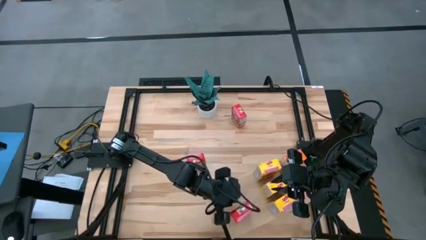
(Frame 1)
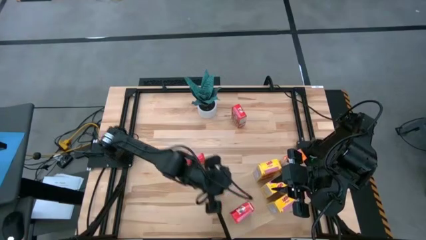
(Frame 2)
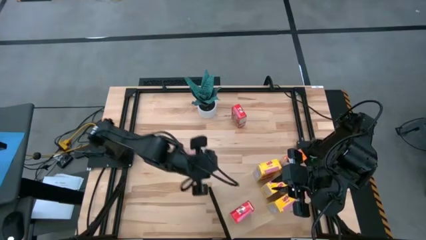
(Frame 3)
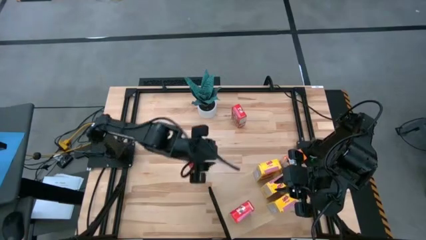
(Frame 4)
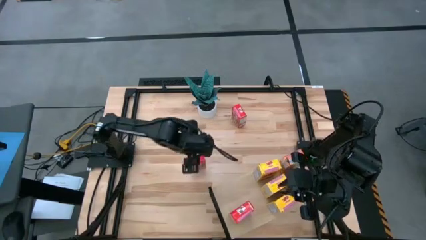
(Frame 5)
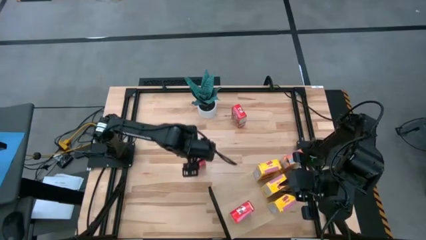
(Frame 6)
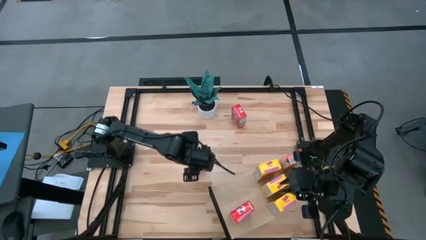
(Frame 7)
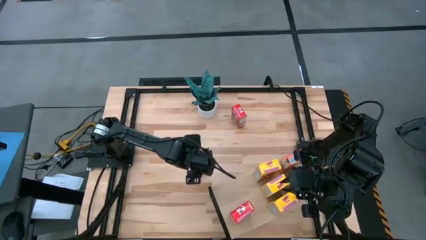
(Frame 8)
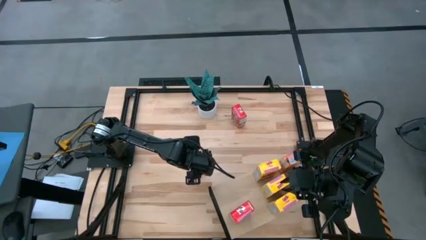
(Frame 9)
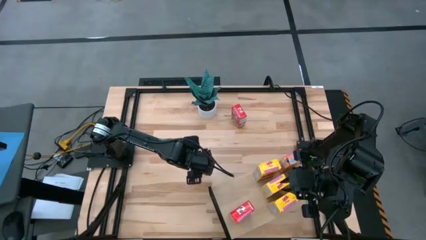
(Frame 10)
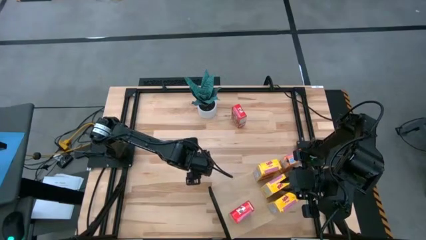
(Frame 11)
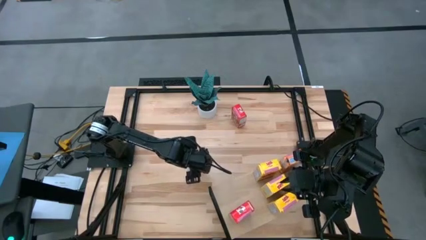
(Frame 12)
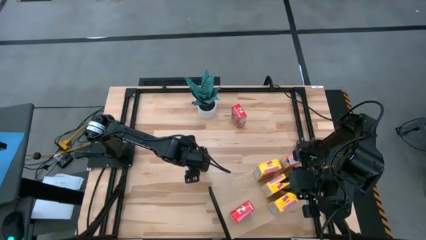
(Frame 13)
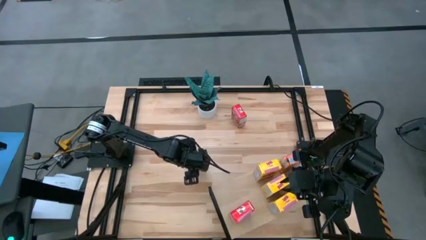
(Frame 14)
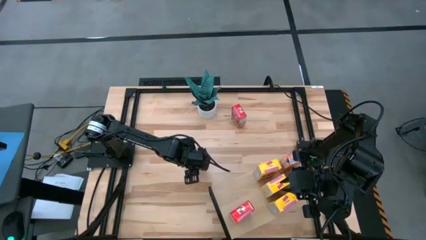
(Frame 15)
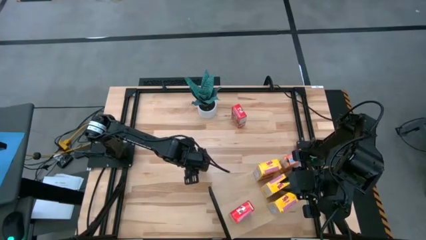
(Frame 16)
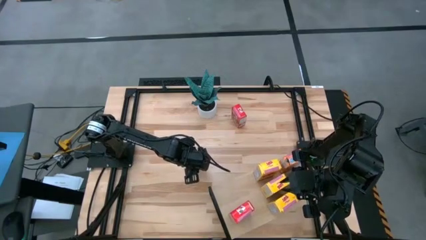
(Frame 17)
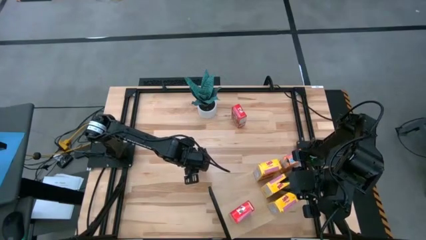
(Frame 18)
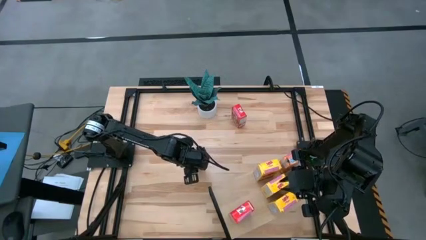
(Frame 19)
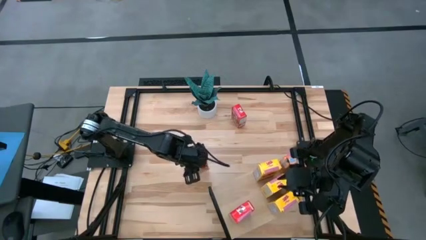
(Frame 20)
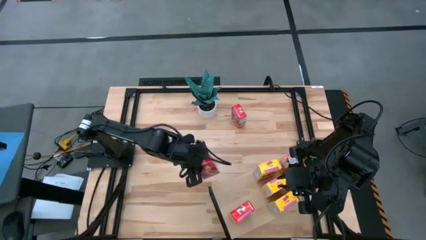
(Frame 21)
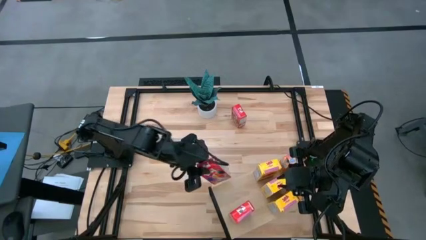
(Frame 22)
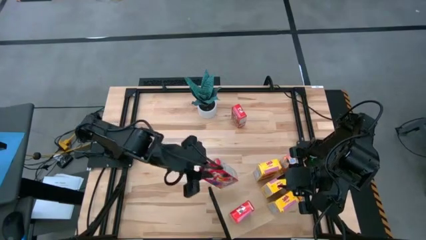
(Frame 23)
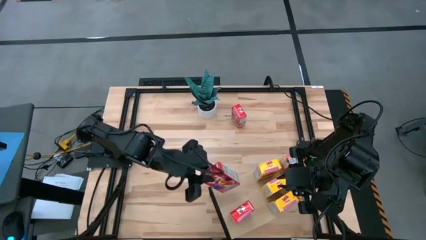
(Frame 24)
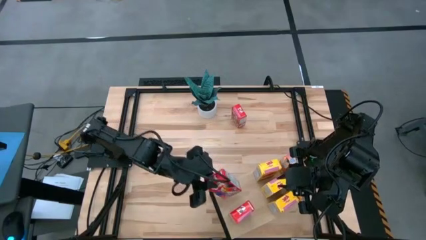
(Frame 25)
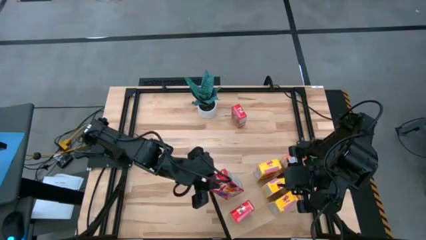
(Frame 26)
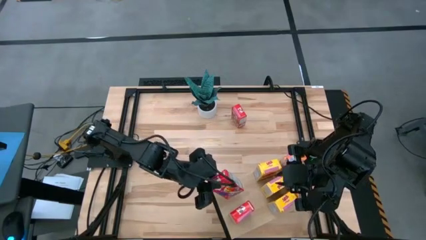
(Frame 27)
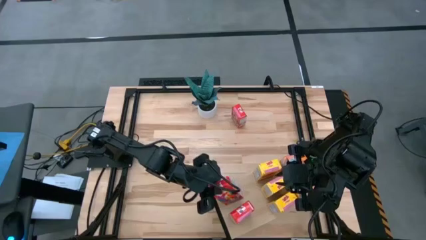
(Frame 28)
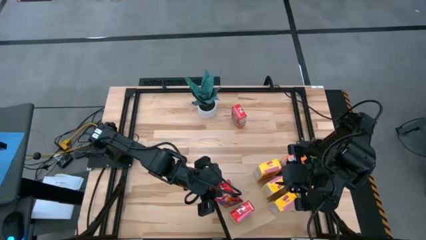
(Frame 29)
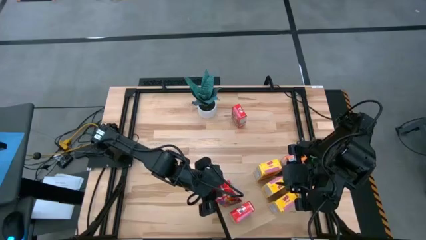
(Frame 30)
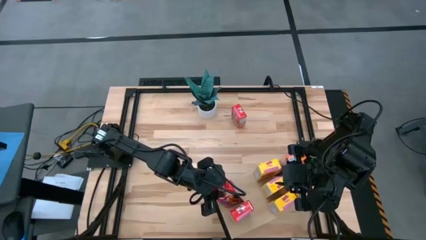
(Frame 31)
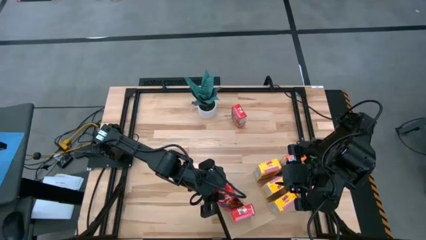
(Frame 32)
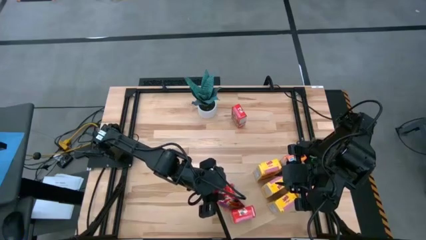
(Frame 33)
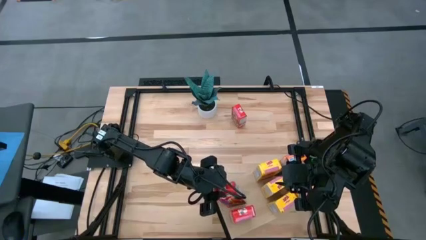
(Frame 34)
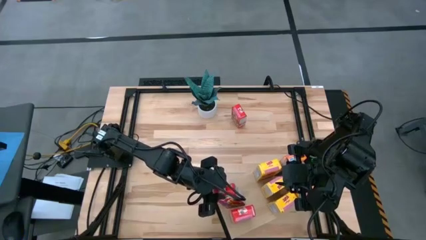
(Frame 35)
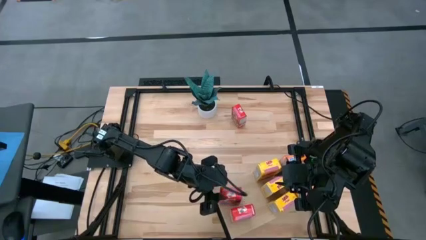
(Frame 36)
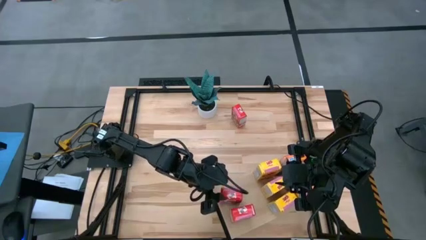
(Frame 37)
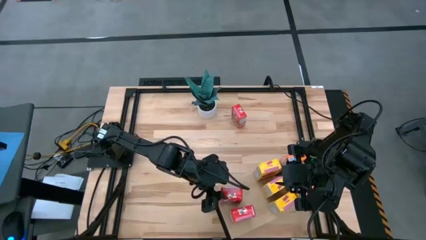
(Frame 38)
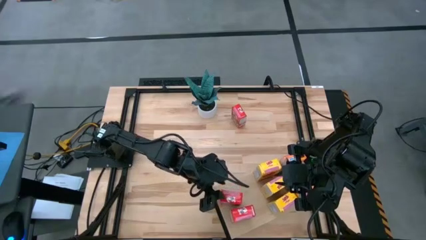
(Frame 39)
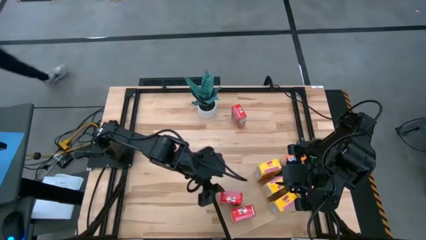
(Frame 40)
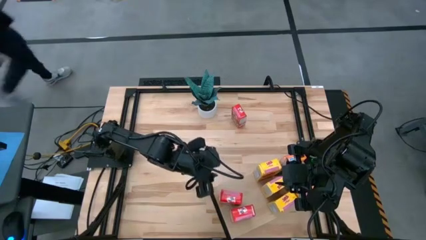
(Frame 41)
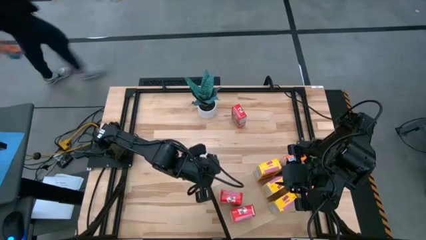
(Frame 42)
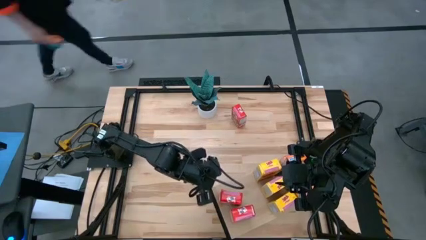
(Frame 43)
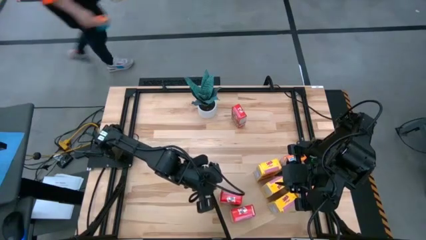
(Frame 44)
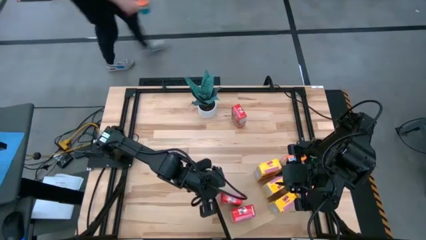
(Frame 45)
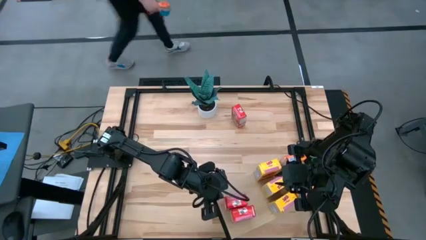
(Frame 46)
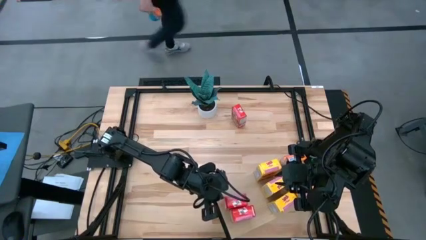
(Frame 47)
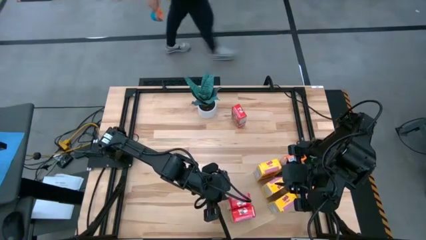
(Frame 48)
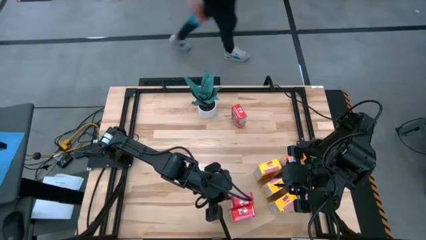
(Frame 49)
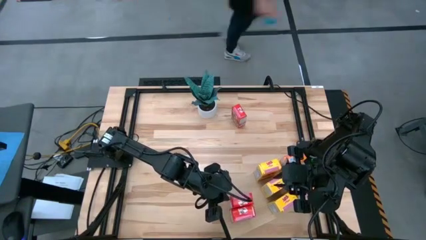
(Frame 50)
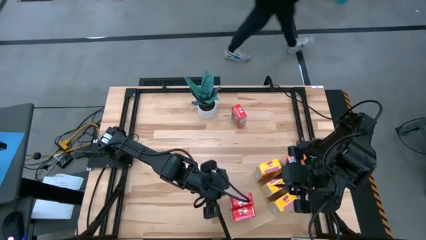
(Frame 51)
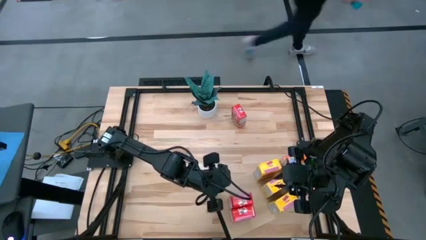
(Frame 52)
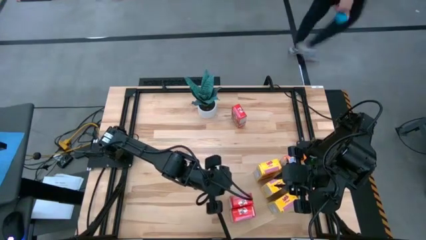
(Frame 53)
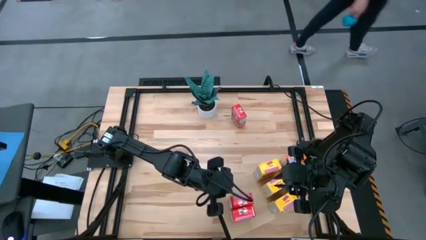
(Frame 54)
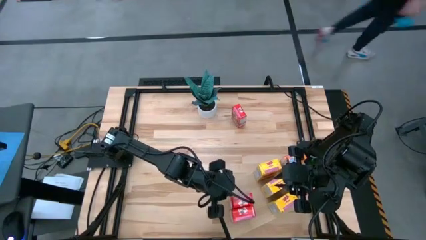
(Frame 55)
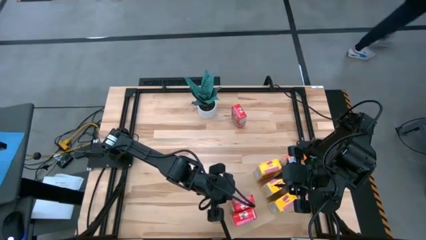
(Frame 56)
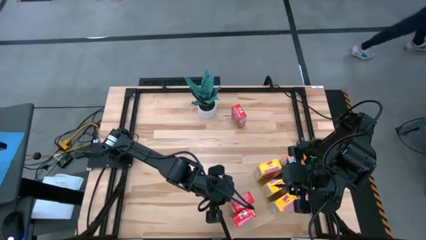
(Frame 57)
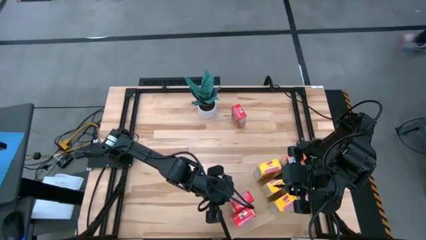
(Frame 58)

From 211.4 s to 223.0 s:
Task: Stack cereal on shelf
Put the bottom red cereal box on the shelf aligned with the other red cereal box
